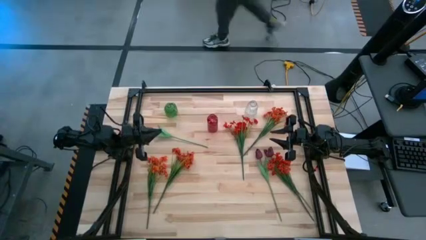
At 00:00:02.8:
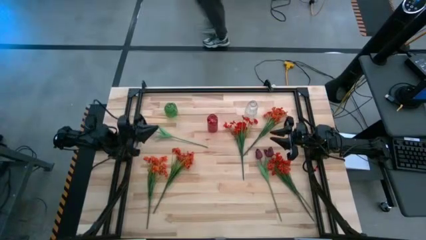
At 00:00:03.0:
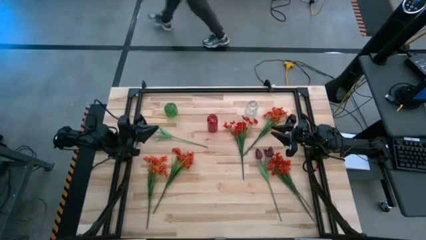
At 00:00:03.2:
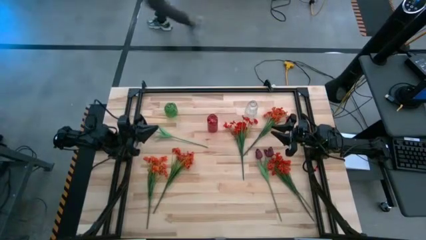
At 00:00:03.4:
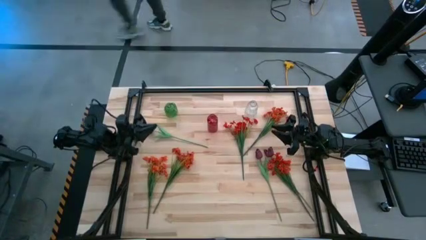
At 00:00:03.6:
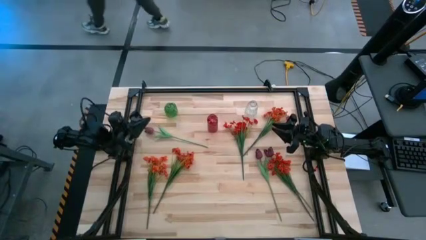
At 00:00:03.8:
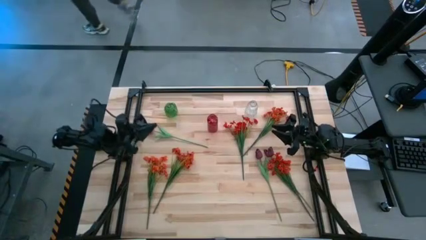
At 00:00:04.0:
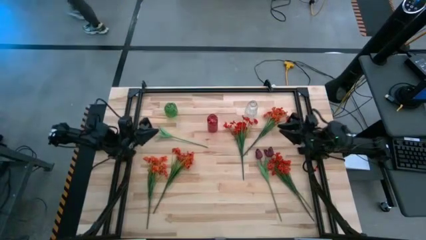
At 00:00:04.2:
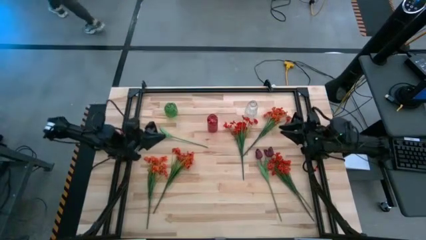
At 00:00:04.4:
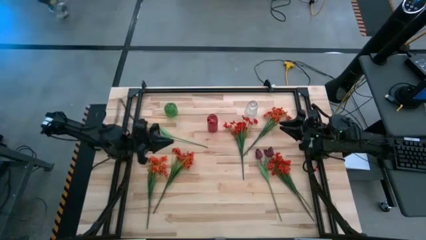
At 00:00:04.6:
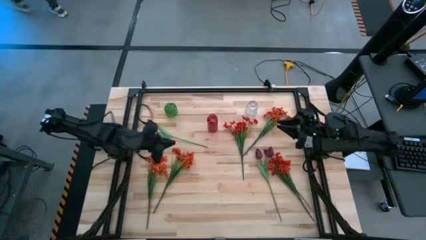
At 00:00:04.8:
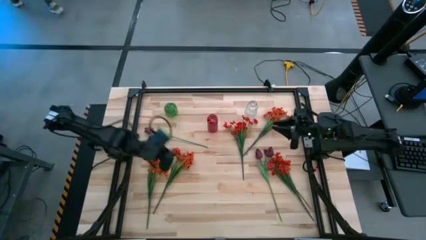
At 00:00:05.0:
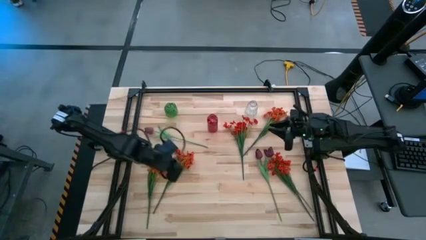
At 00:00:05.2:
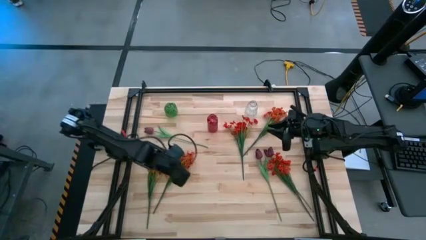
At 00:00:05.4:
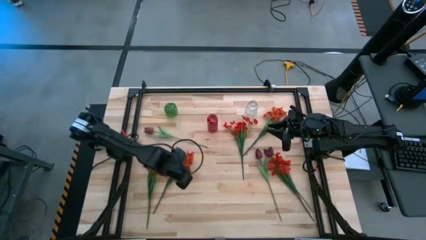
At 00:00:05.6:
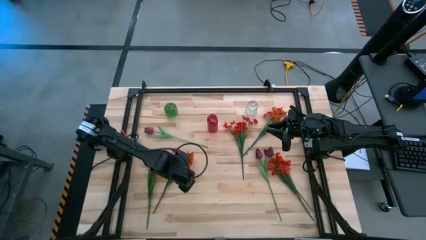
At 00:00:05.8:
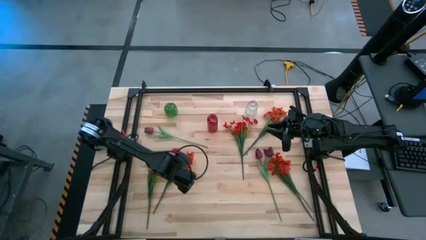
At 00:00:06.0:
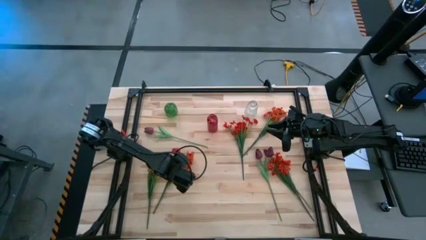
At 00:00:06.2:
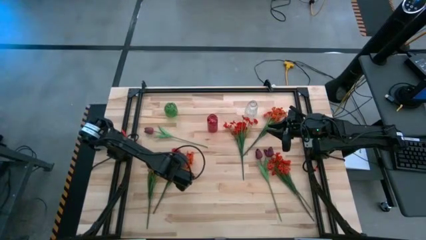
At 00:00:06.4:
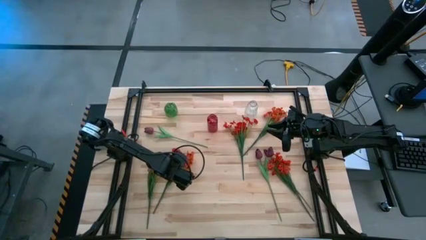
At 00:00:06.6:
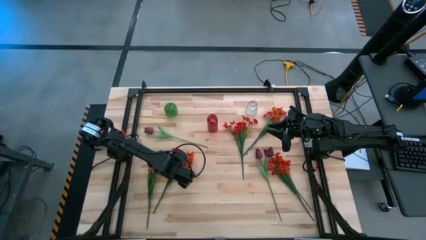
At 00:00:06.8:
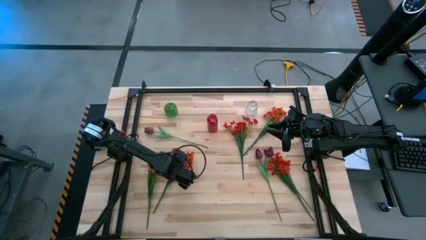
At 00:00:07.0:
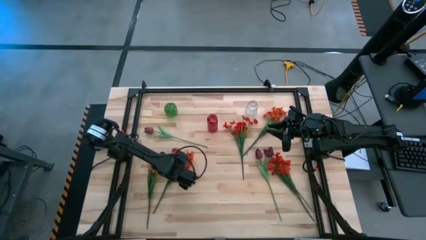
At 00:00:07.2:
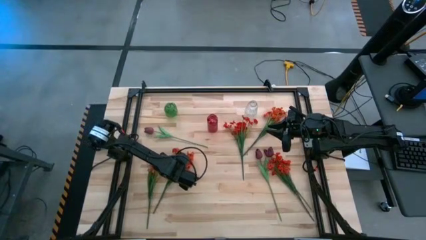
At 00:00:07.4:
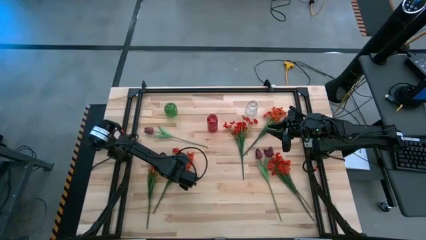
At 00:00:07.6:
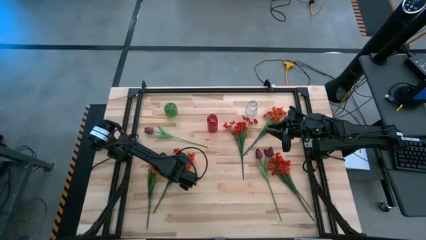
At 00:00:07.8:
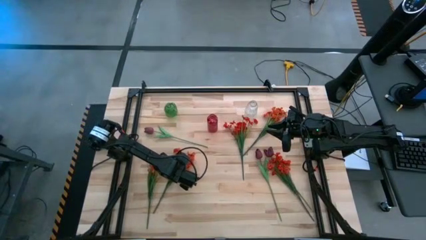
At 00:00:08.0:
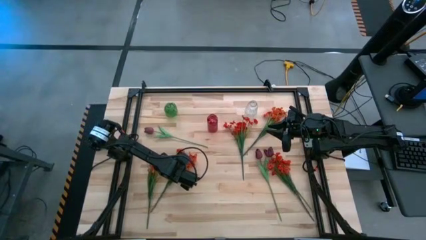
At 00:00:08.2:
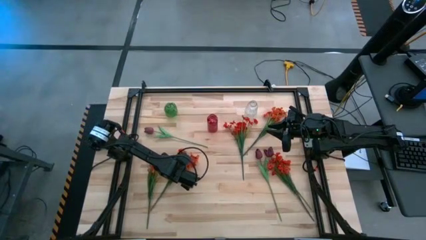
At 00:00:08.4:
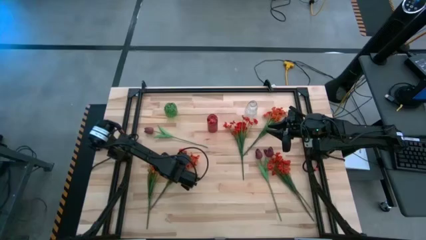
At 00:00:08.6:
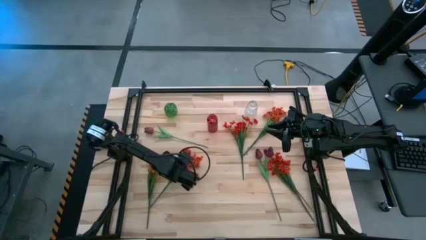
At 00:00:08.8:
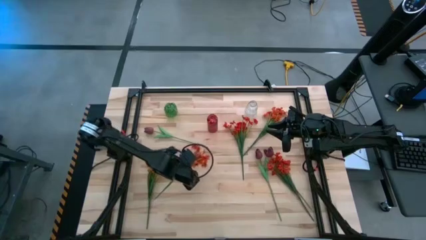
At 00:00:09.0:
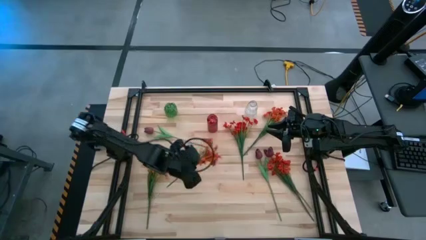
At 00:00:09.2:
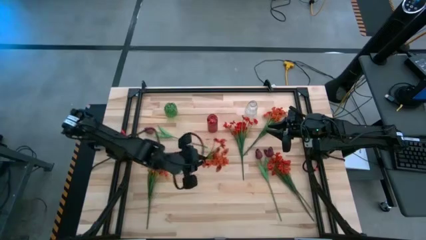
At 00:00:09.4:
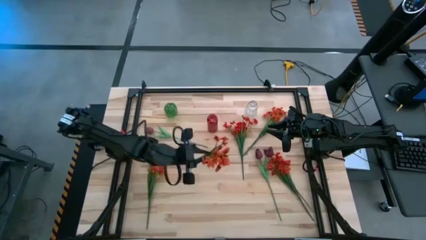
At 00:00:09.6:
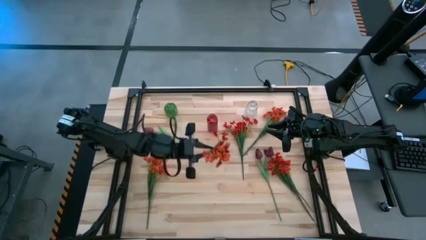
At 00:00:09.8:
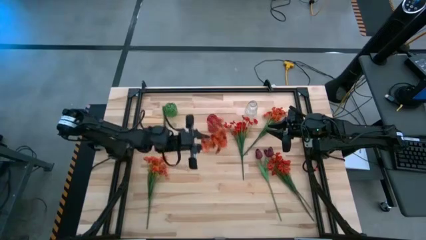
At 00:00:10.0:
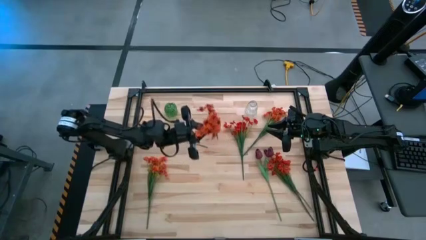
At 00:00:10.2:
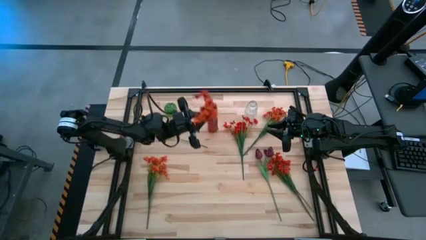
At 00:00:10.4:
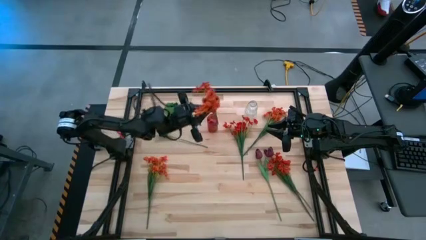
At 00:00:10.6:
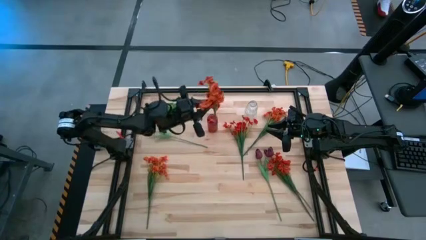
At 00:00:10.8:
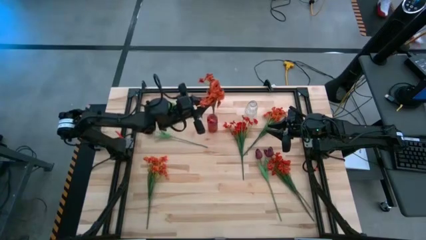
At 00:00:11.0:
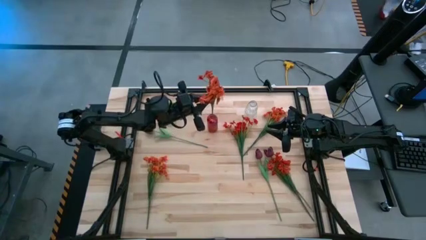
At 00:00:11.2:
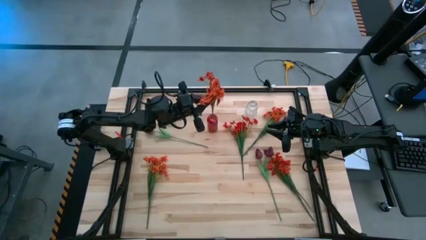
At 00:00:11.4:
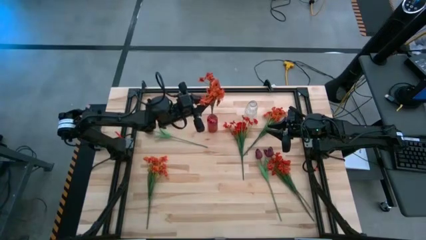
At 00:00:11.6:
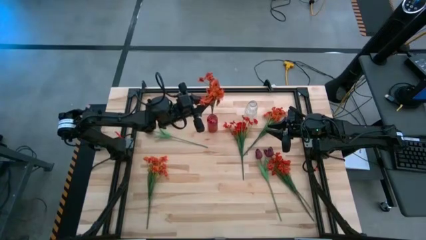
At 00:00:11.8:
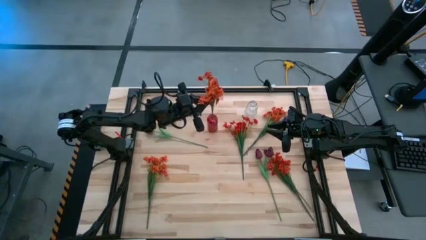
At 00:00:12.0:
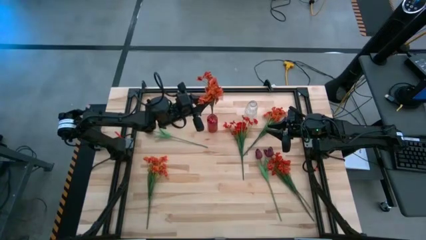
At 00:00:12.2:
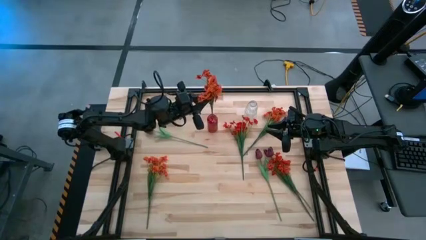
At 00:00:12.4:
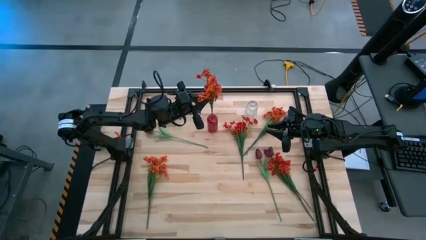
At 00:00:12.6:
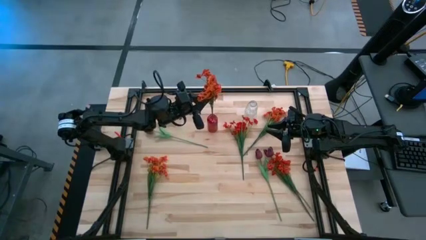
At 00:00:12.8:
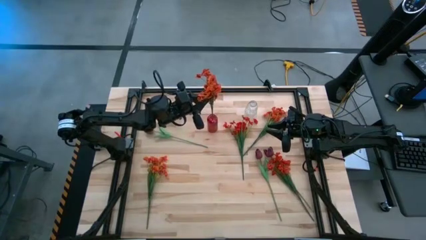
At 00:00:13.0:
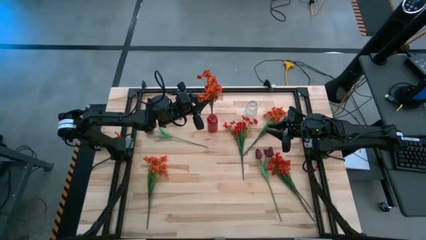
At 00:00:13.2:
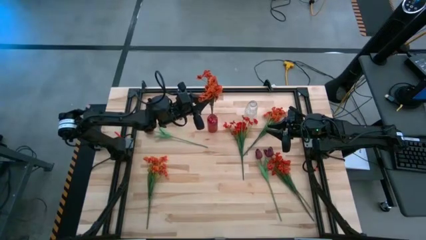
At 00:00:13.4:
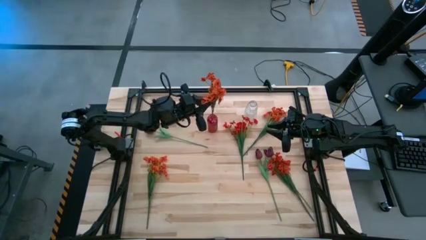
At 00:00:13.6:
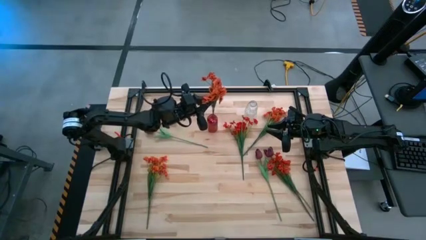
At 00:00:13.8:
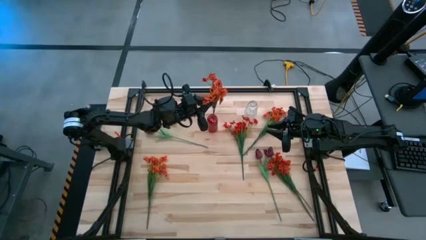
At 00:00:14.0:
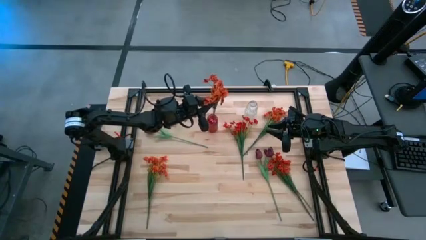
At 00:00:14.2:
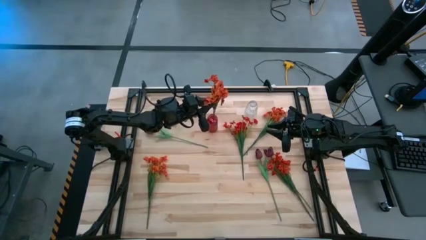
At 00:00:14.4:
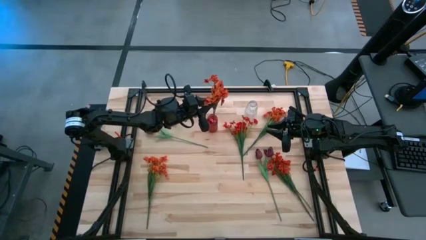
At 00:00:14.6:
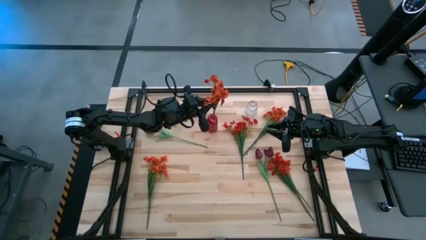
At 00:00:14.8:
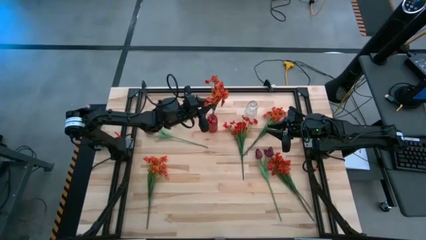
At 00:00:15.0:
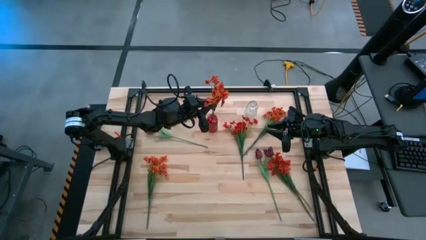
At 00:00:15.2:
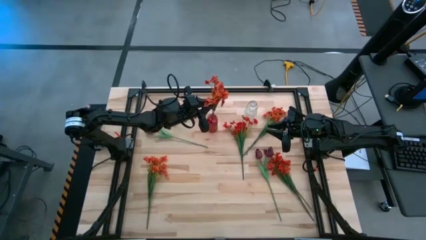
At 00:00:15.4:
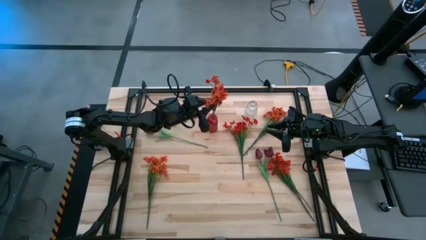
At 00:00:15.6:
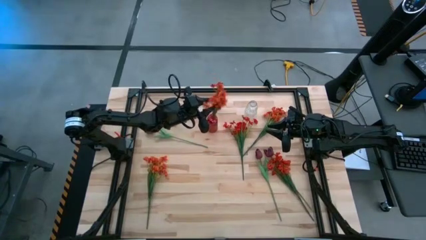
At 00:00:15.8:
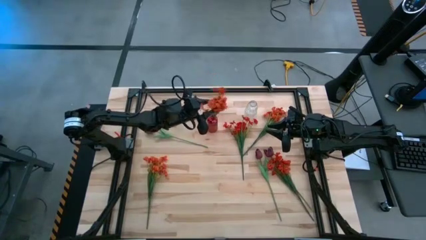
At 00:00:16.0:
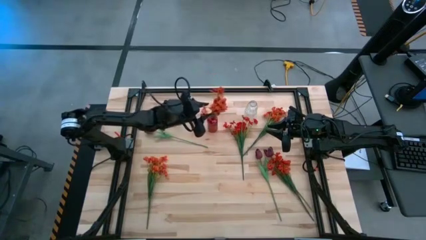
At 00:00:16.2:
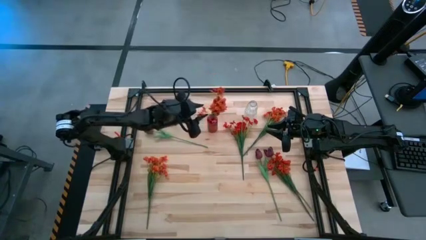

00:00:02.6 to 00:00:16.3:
Task: Sort flowers into vase by color
Put the bottom right orange flowers into the red vase
